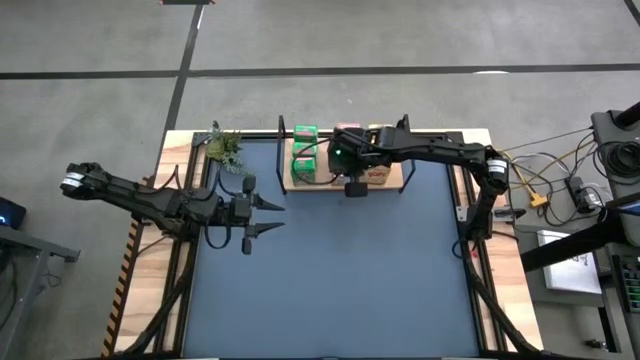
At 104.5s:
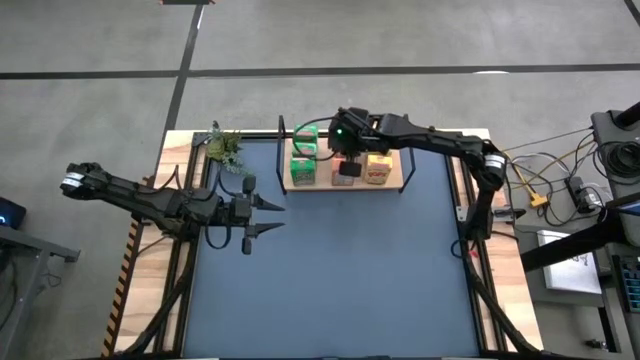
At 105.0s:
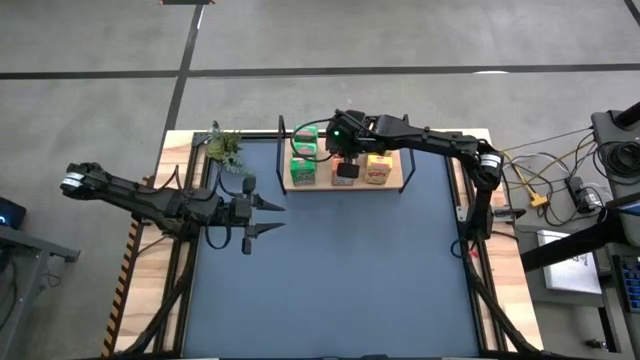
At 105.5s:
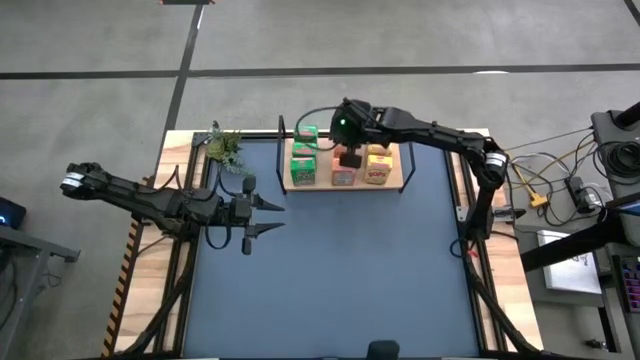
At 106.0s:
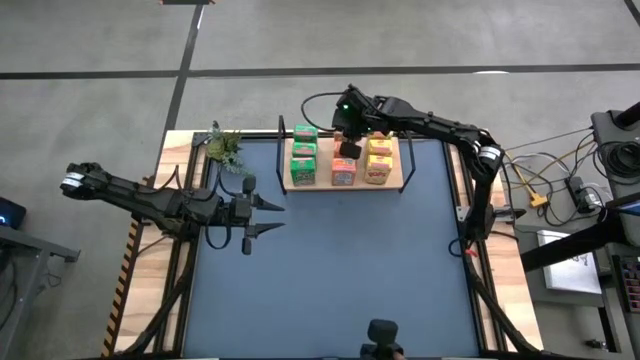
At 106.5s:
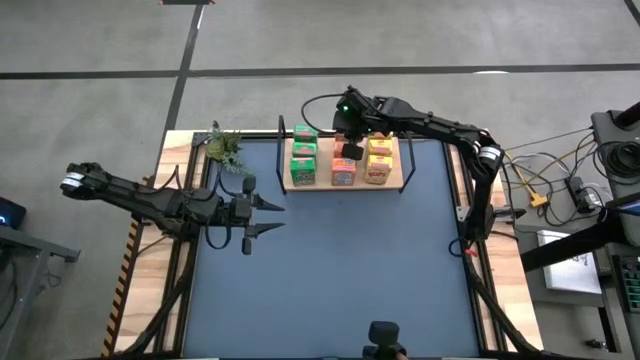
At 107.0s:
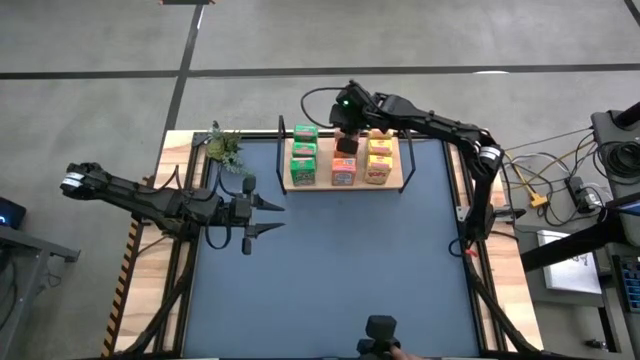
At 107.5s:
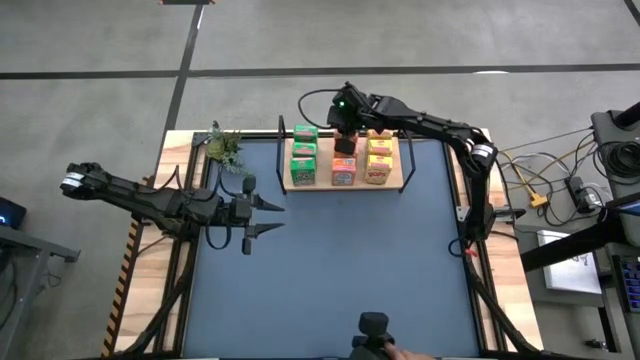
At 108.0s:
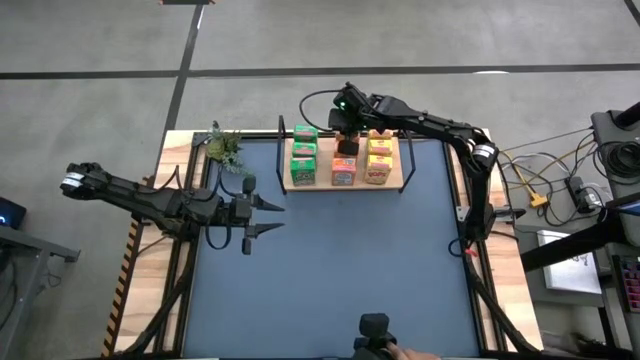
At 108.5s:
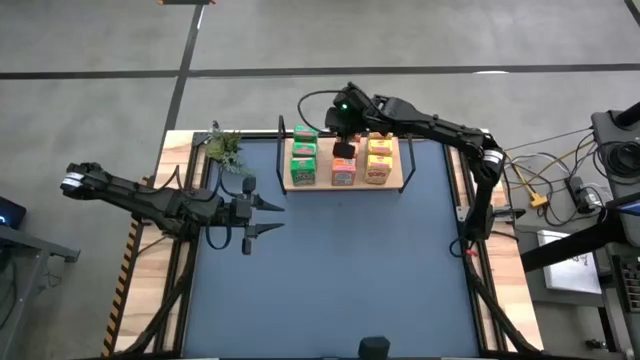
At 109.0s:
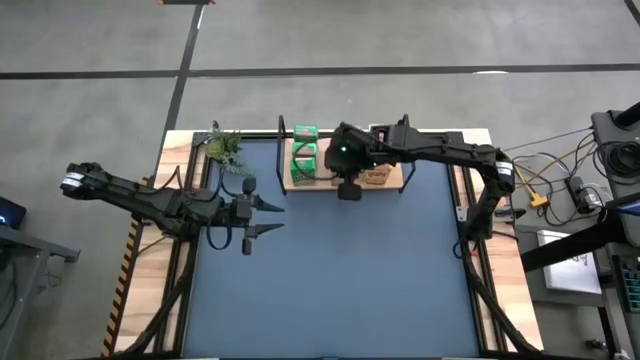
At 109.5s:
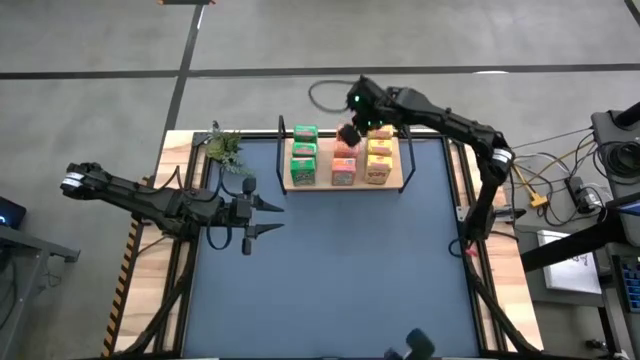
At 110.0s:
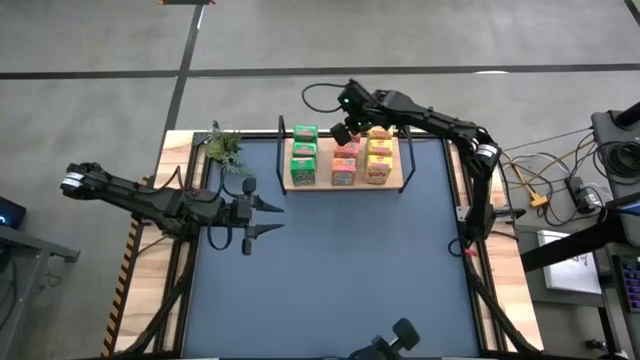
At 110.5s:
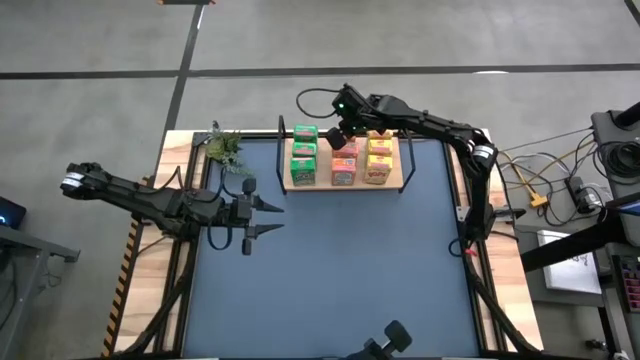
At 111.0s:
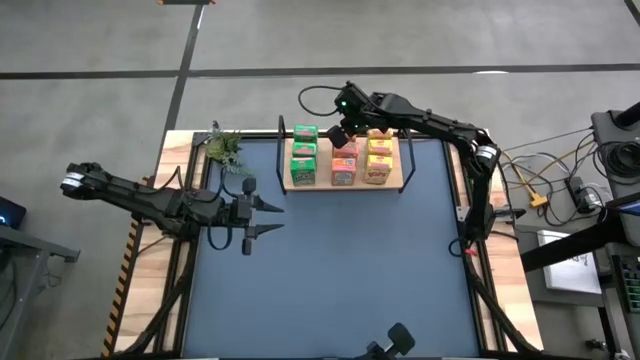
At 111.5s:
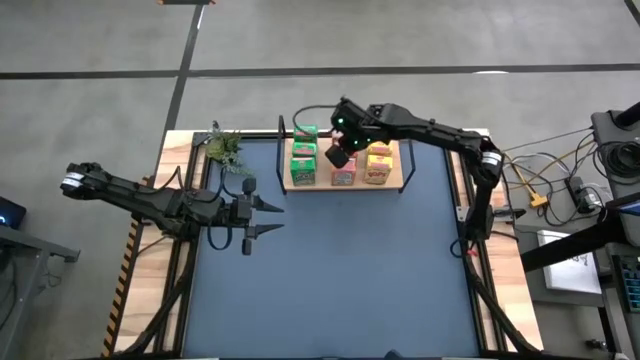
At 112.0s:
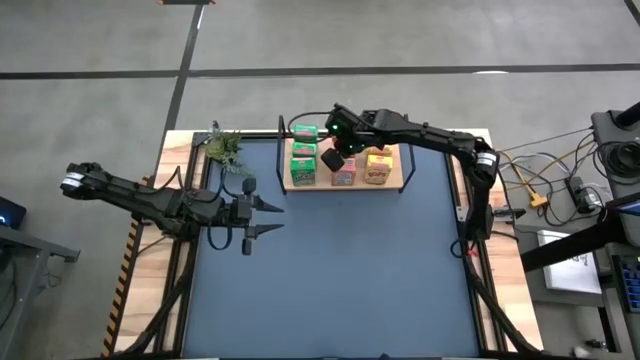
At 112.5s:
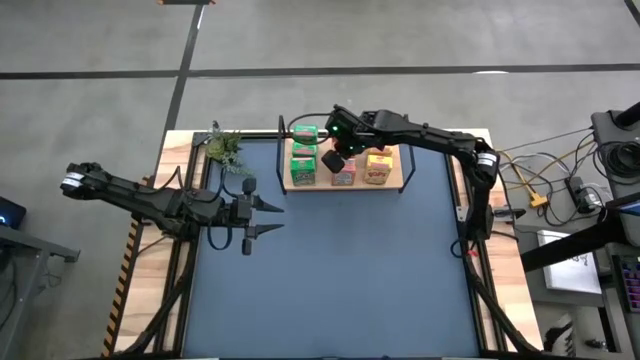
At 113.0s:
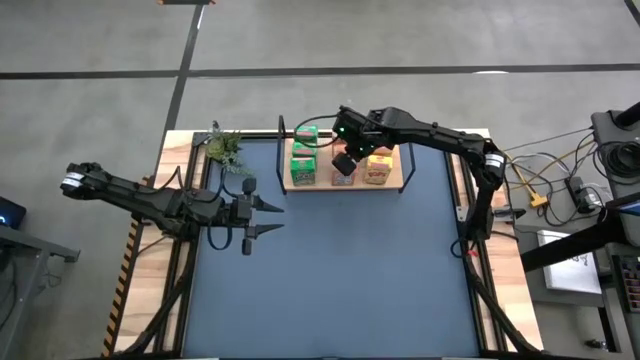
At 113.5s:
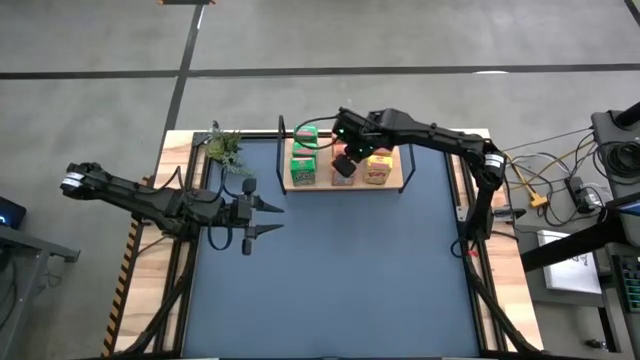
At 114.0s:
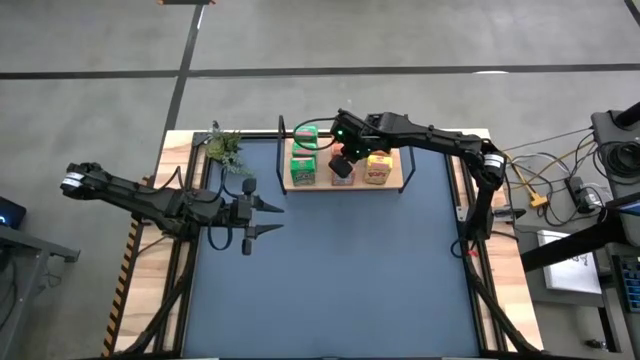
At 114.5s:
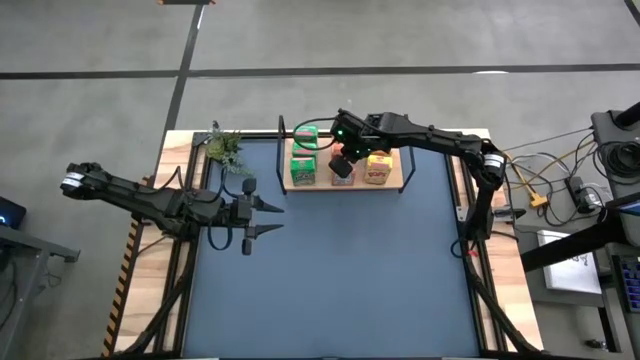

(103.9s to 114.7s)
Task: Stack cereal on shelf
Adjust the orange cereal boxes

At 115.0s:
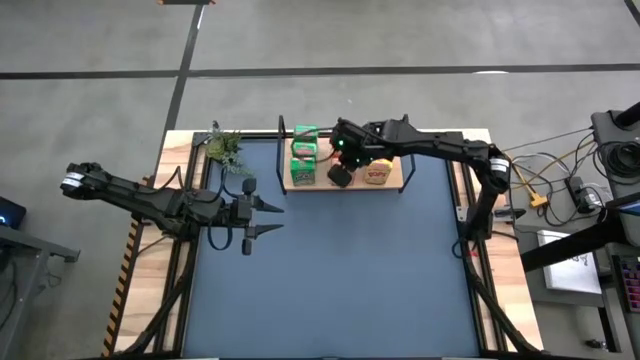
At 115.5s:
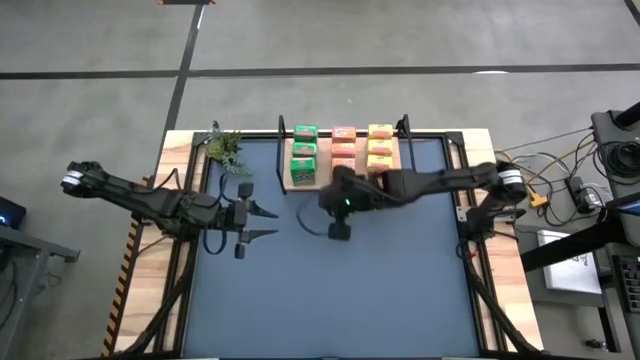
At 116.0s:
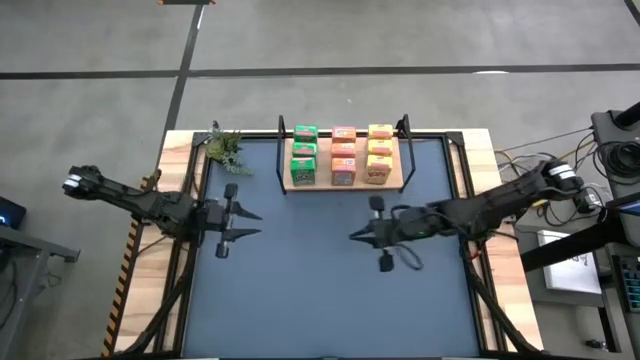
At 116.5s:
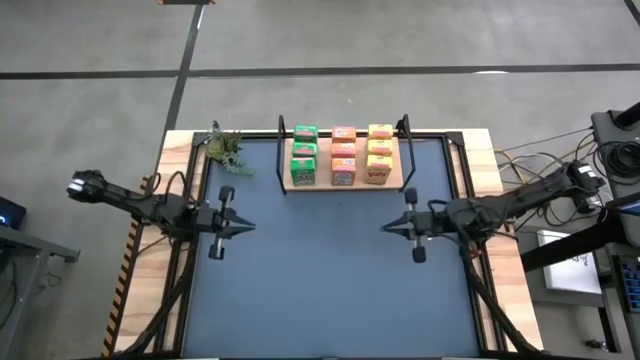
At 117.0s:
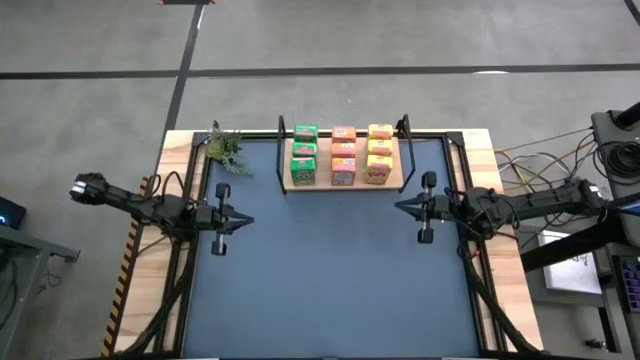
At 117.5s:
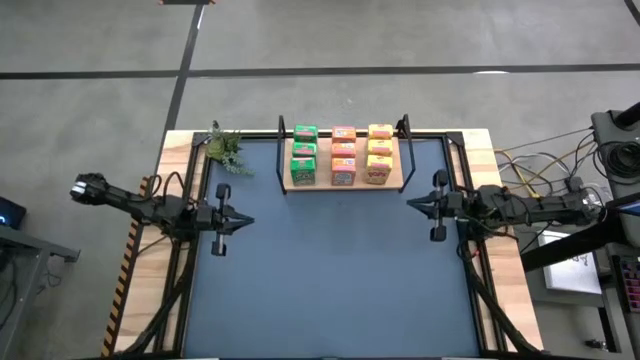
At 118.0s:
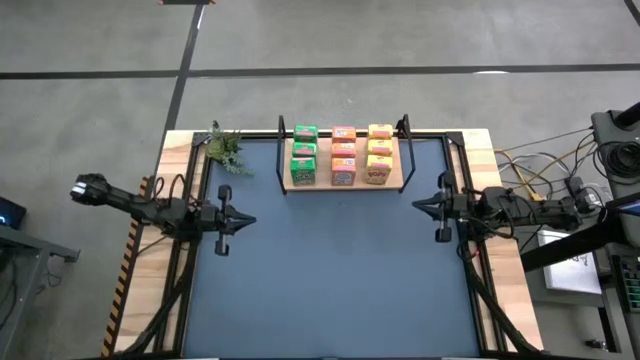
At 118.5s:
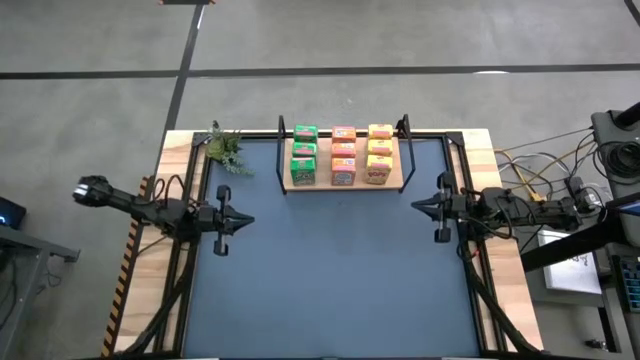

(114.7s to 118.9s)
Return to Home Position

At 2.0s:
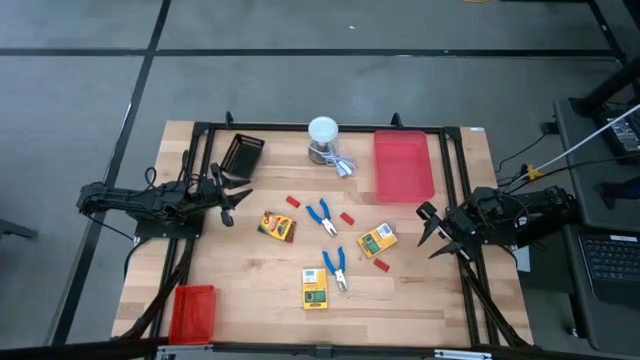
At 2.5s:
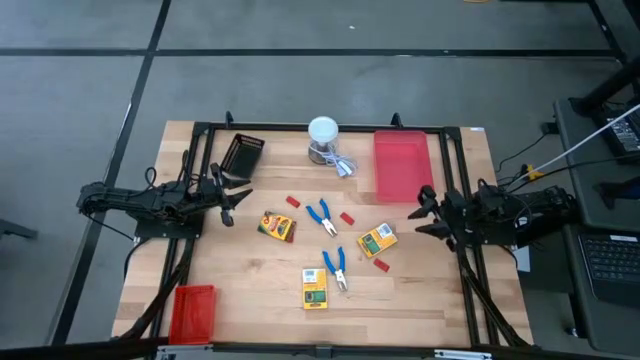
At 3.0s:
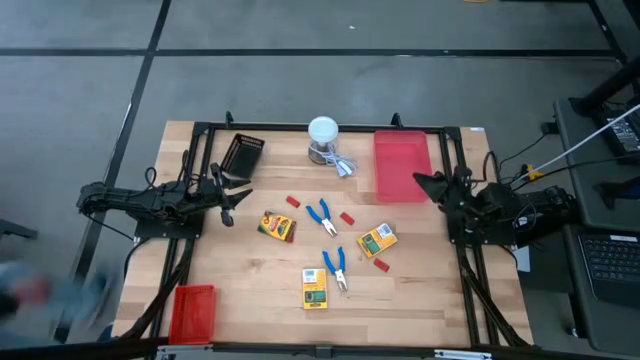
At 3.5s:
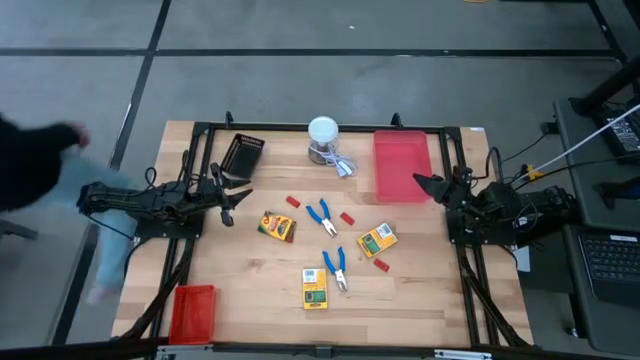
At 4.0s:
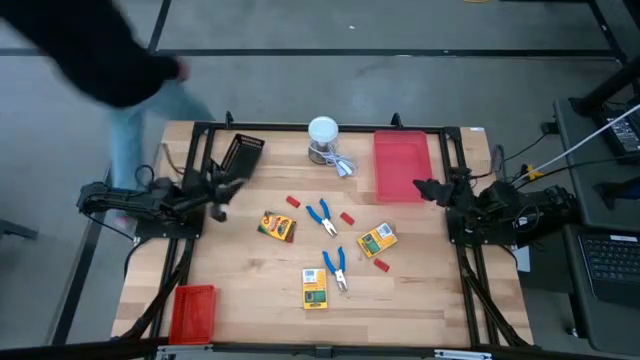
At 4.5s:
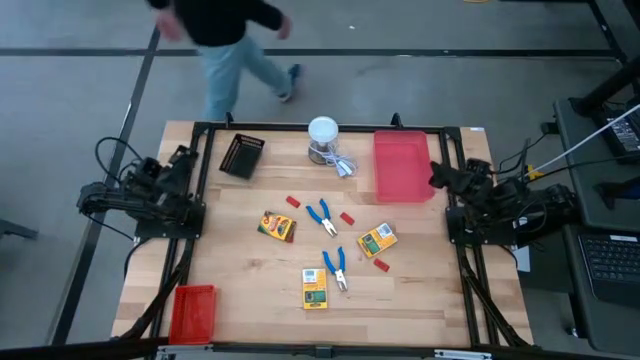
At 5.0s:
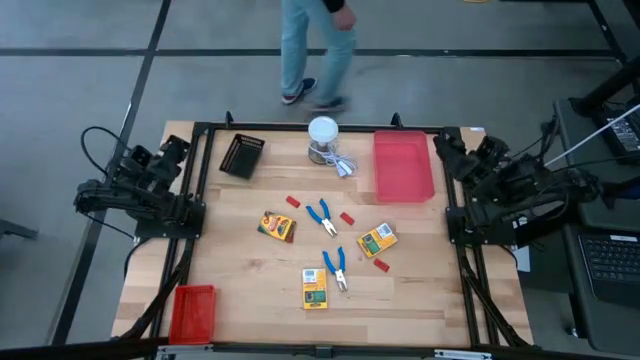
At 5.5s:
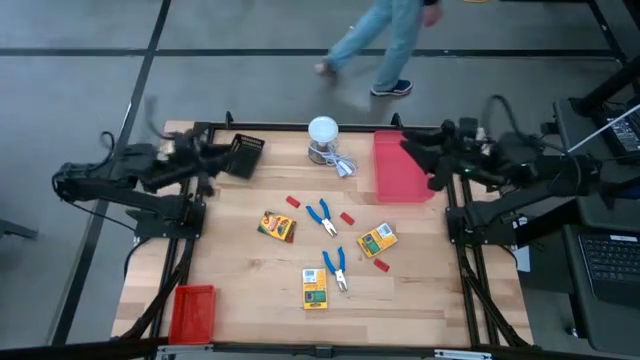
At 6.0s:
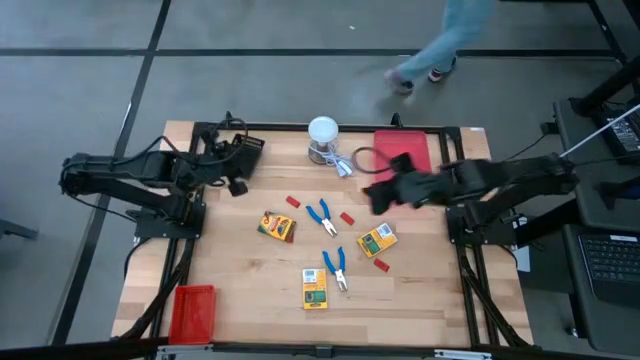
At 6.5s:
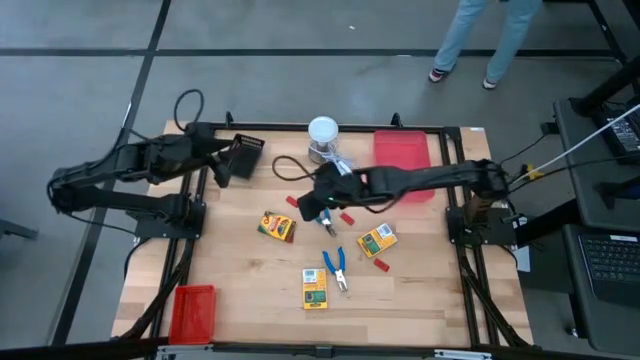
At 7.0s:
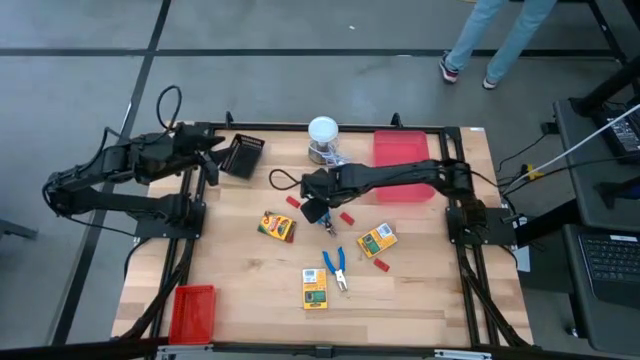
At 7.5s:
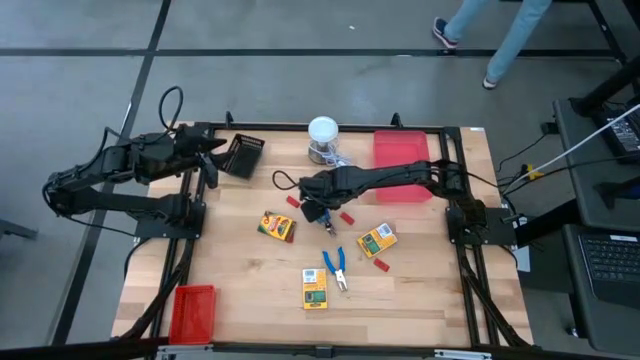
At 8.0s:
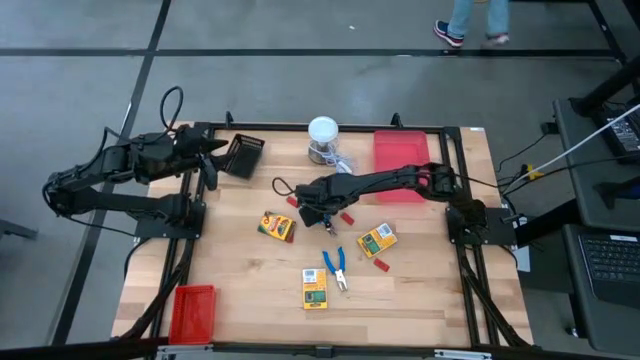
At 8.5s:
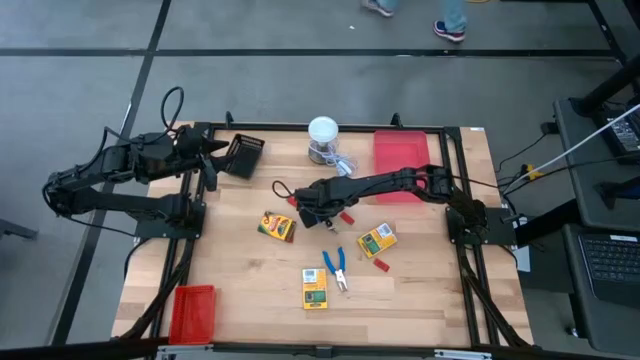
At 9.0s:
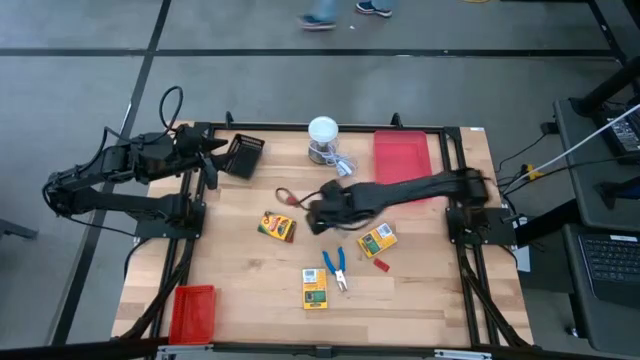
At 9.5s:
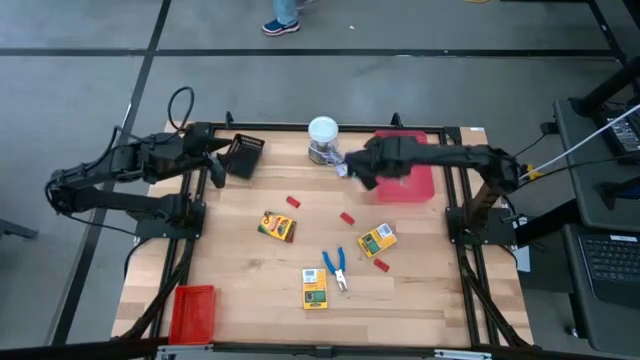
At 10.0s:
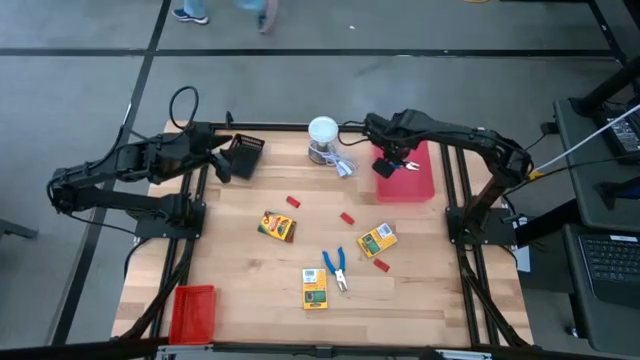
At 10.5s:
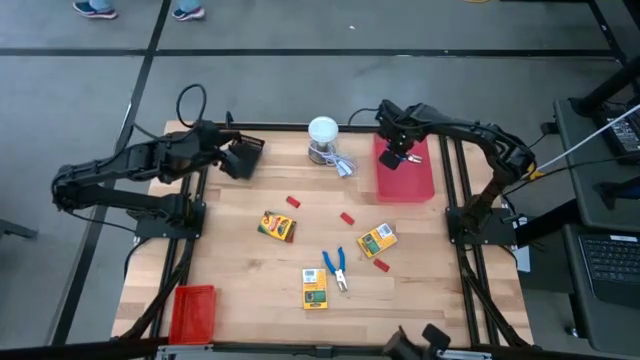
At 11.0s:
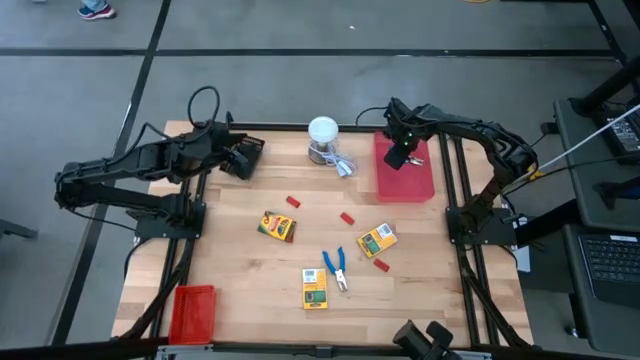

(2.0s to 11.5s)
Task: Pick & Place School Supplies
Put the blue puncher into the pink bin
